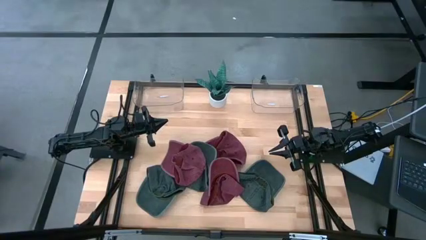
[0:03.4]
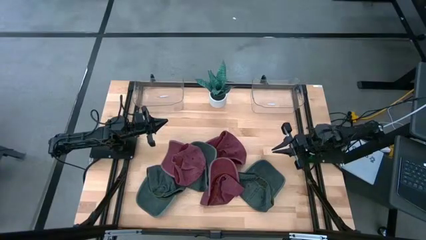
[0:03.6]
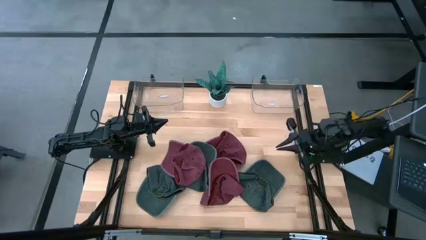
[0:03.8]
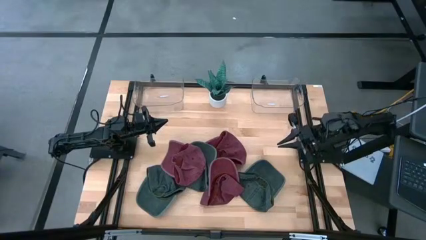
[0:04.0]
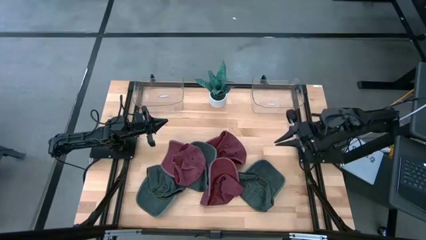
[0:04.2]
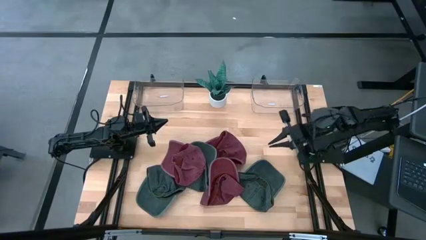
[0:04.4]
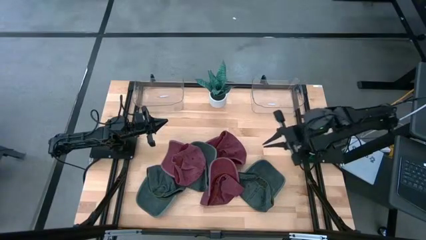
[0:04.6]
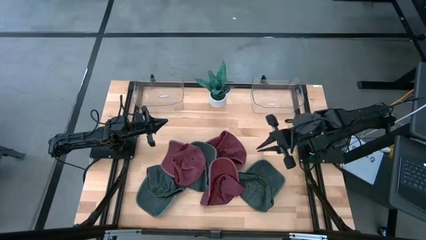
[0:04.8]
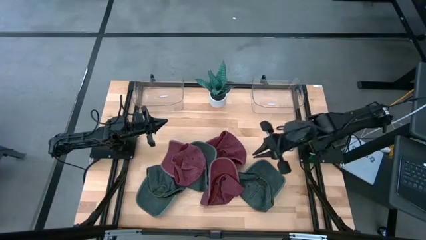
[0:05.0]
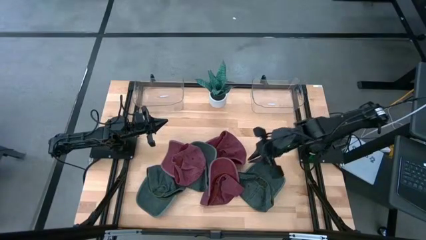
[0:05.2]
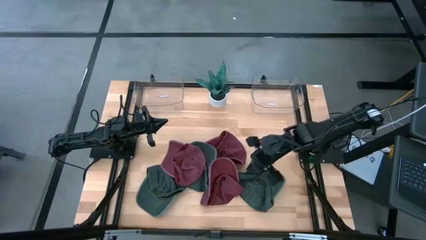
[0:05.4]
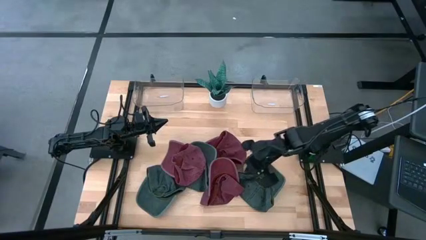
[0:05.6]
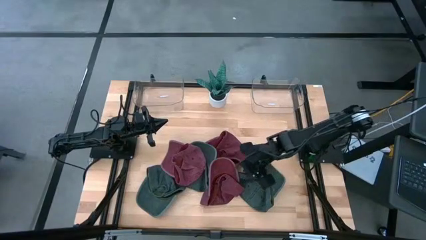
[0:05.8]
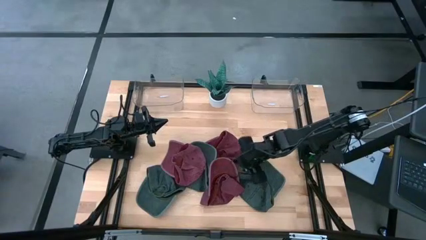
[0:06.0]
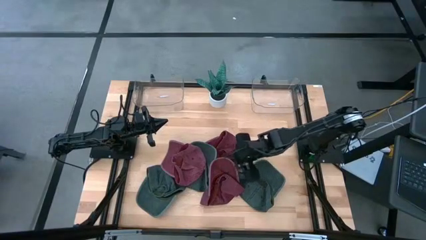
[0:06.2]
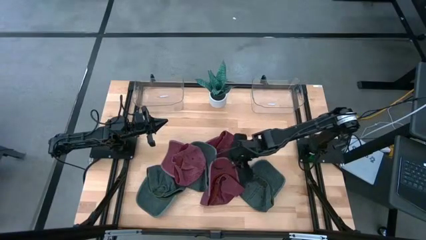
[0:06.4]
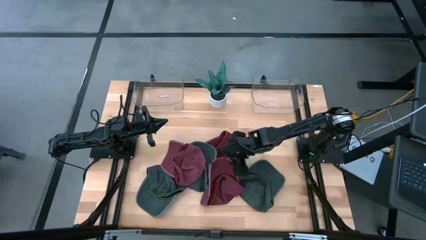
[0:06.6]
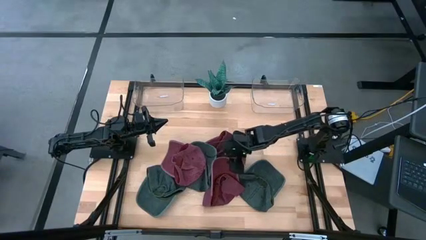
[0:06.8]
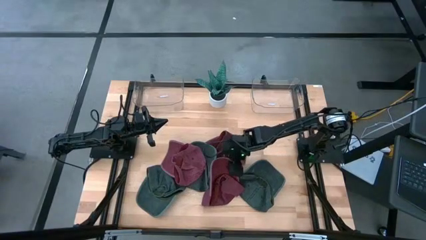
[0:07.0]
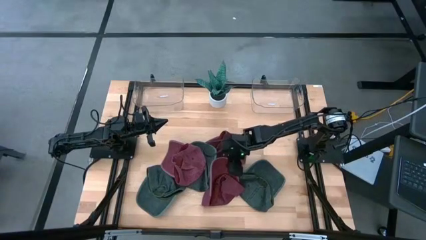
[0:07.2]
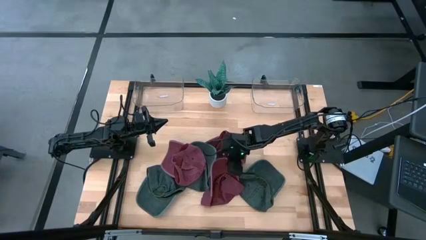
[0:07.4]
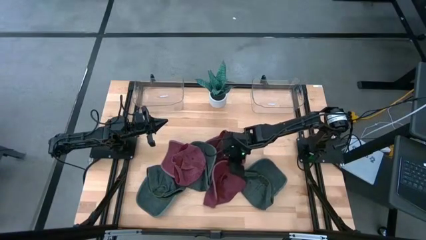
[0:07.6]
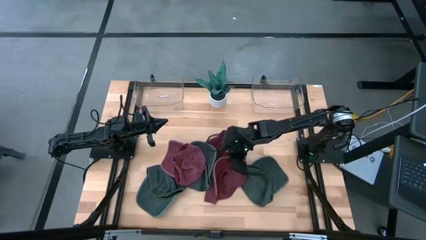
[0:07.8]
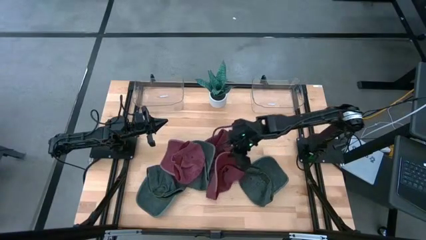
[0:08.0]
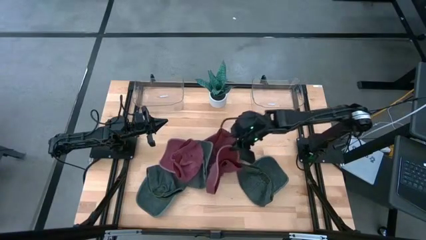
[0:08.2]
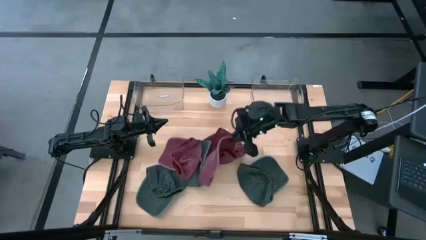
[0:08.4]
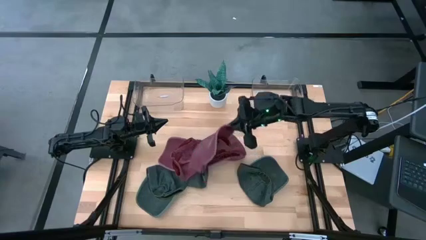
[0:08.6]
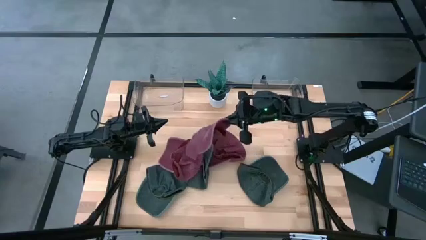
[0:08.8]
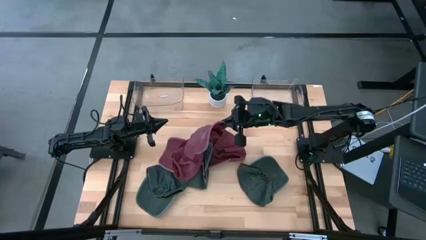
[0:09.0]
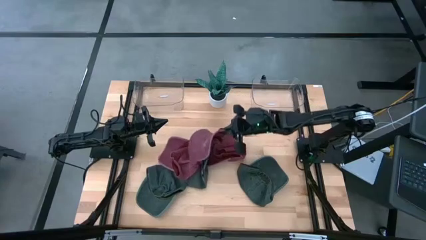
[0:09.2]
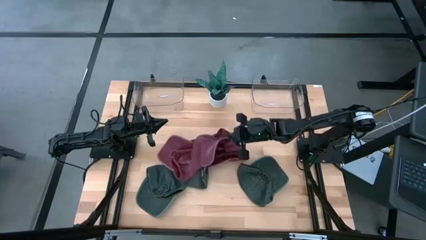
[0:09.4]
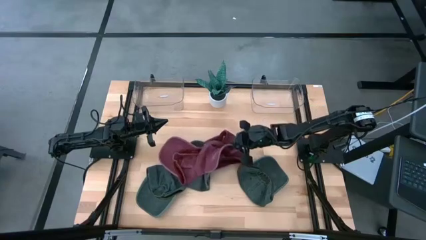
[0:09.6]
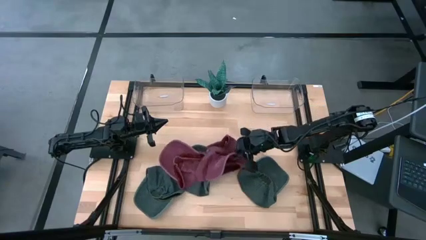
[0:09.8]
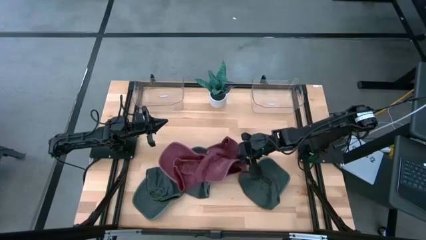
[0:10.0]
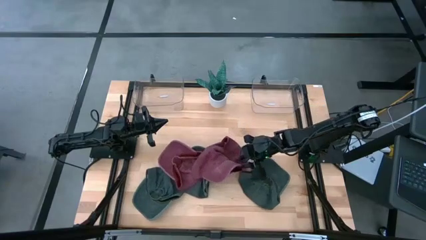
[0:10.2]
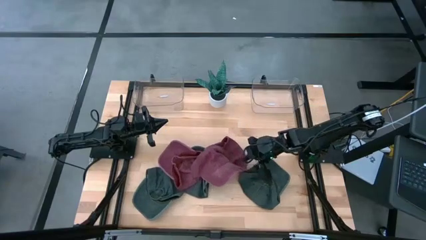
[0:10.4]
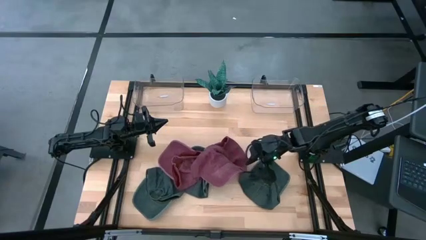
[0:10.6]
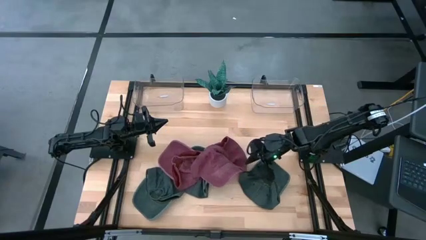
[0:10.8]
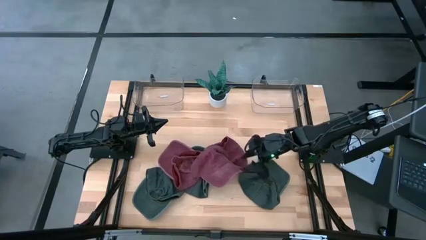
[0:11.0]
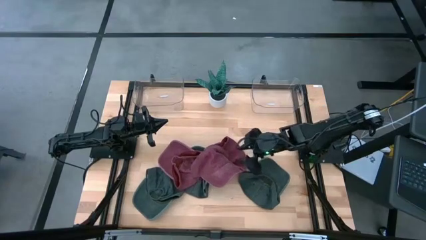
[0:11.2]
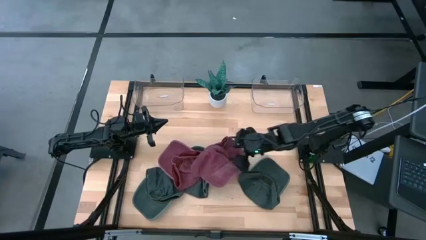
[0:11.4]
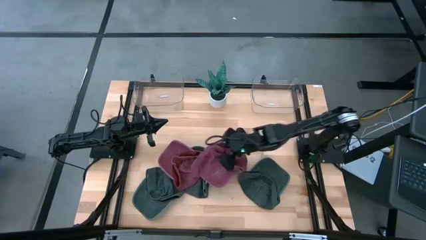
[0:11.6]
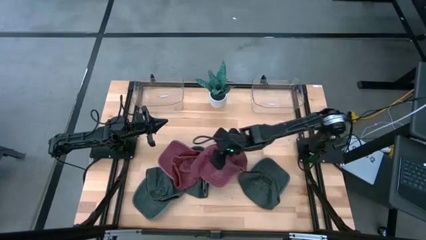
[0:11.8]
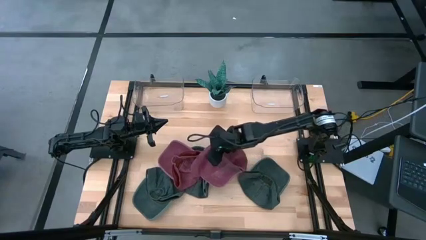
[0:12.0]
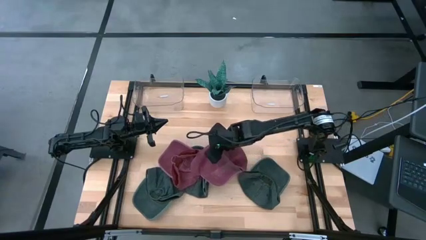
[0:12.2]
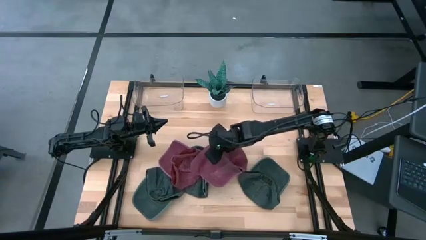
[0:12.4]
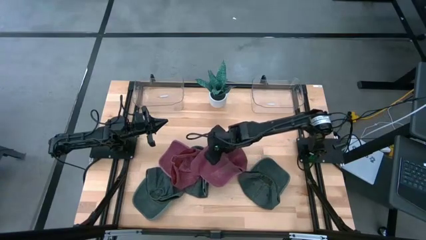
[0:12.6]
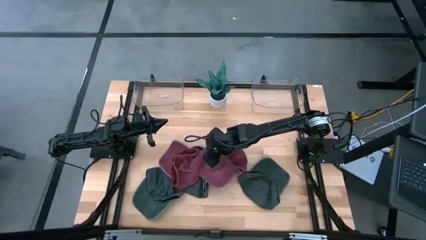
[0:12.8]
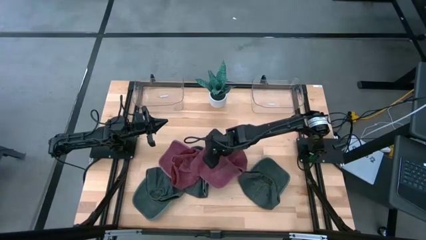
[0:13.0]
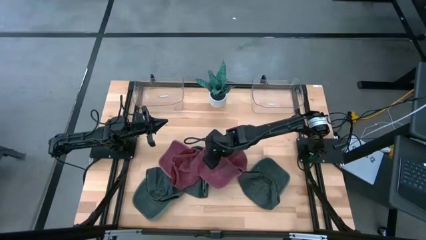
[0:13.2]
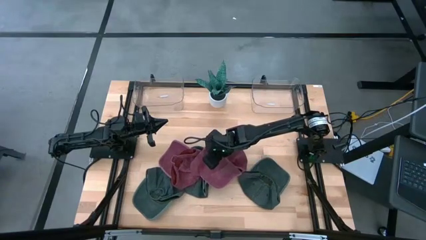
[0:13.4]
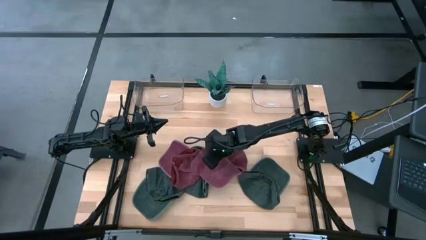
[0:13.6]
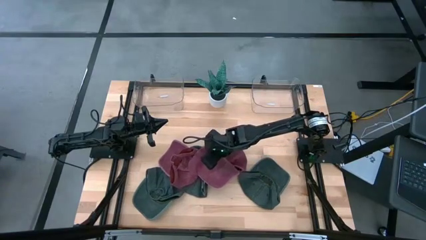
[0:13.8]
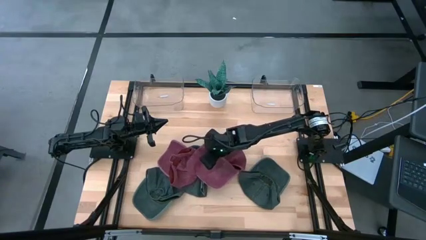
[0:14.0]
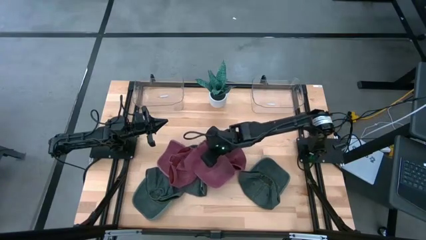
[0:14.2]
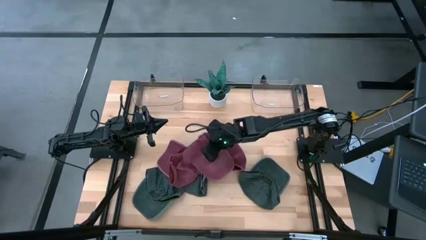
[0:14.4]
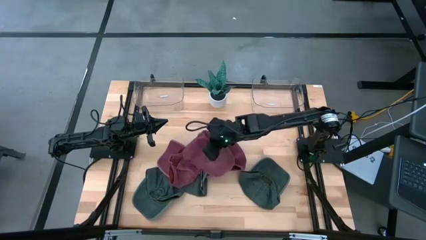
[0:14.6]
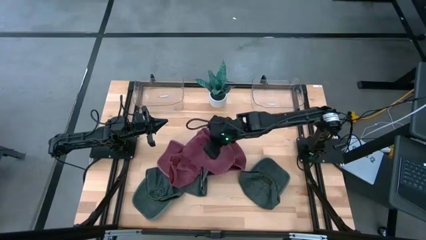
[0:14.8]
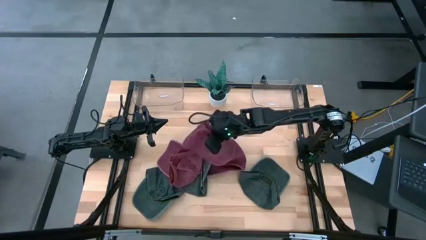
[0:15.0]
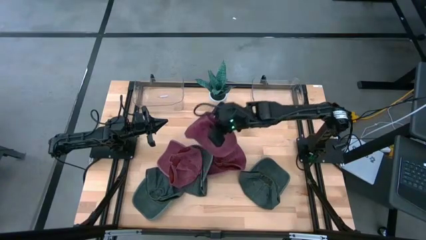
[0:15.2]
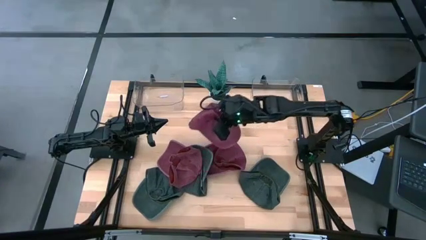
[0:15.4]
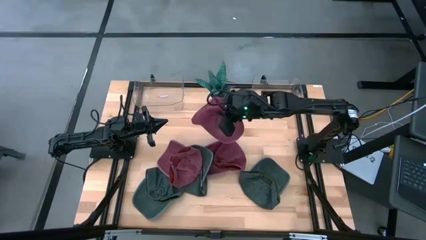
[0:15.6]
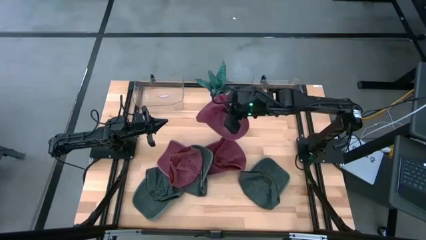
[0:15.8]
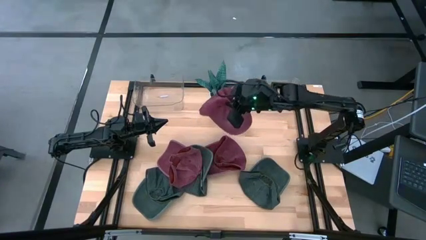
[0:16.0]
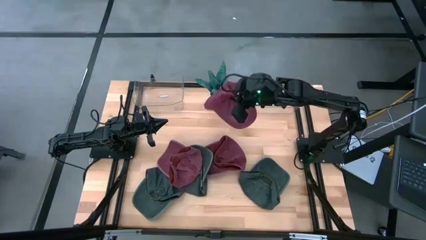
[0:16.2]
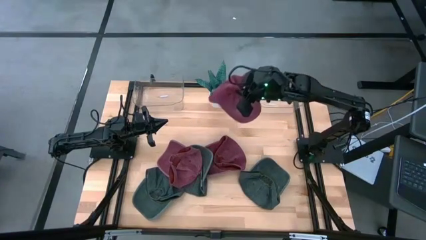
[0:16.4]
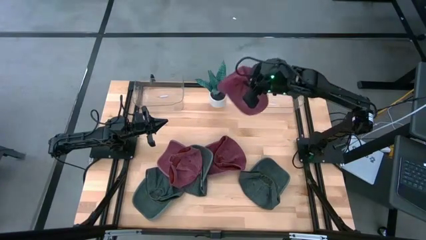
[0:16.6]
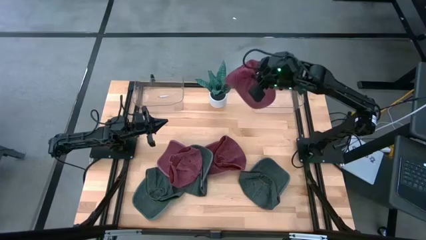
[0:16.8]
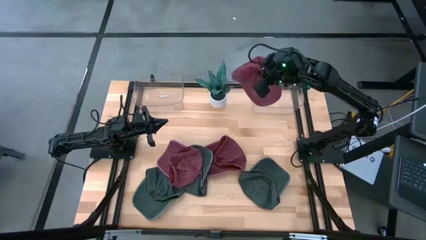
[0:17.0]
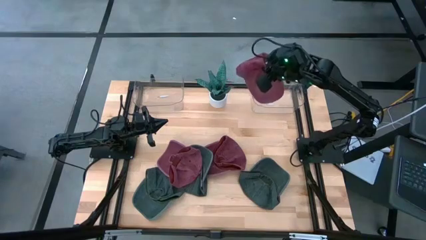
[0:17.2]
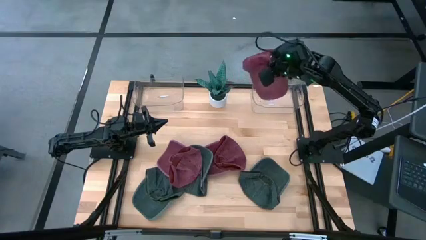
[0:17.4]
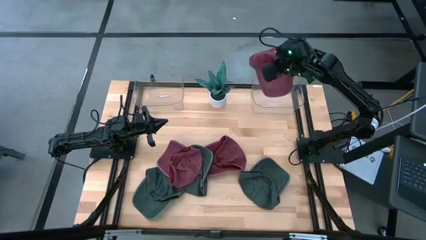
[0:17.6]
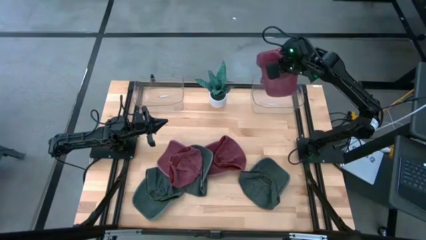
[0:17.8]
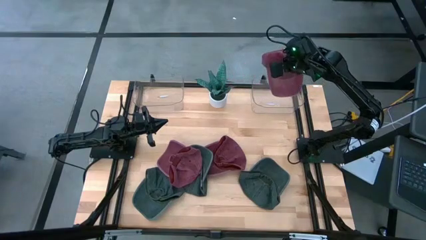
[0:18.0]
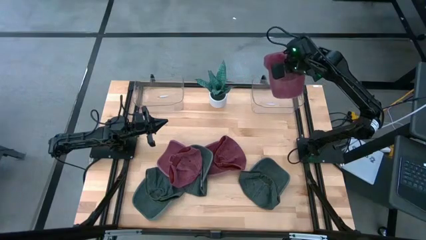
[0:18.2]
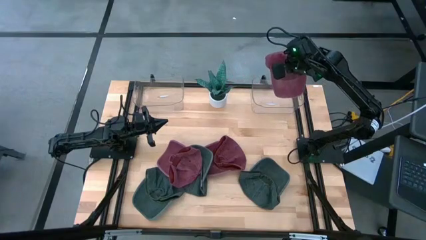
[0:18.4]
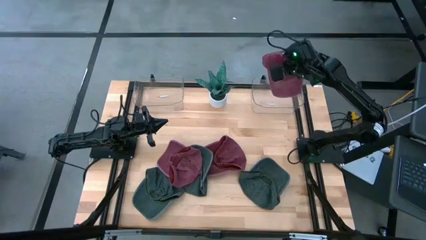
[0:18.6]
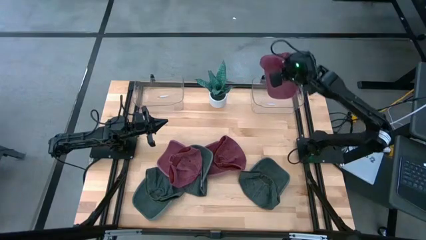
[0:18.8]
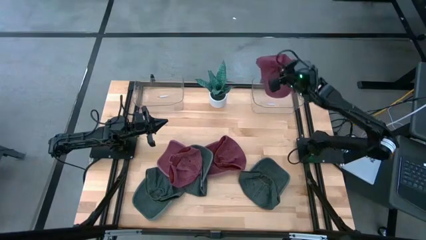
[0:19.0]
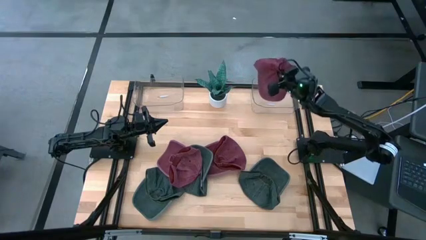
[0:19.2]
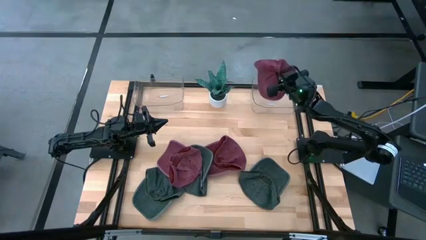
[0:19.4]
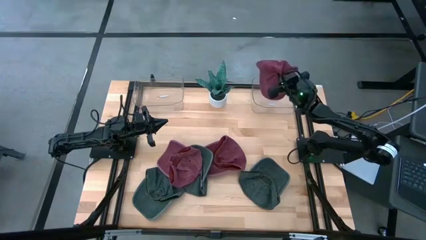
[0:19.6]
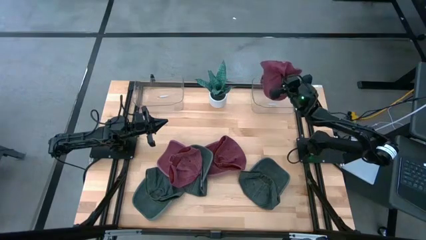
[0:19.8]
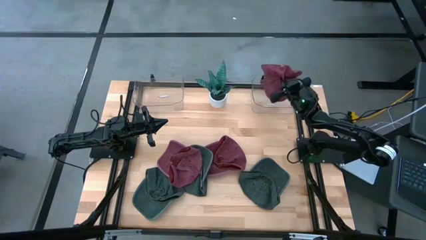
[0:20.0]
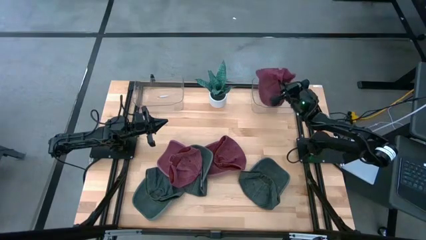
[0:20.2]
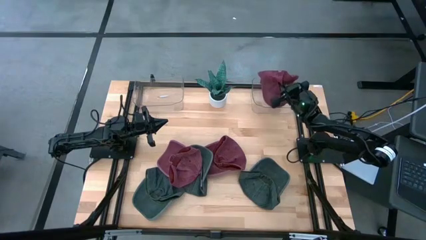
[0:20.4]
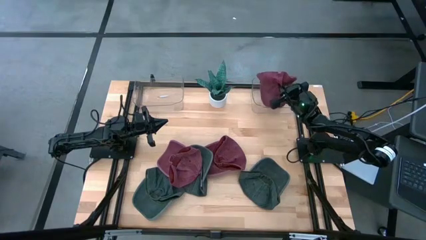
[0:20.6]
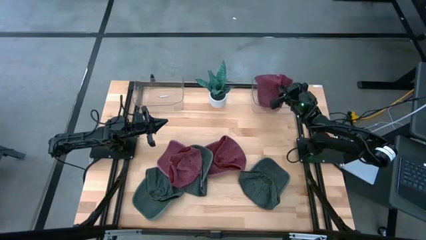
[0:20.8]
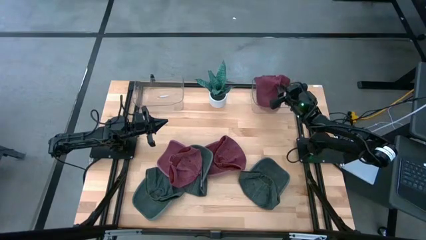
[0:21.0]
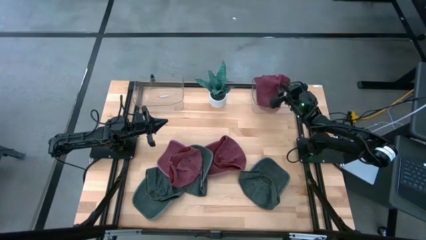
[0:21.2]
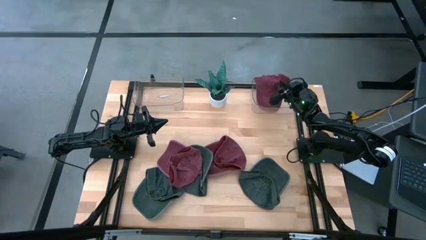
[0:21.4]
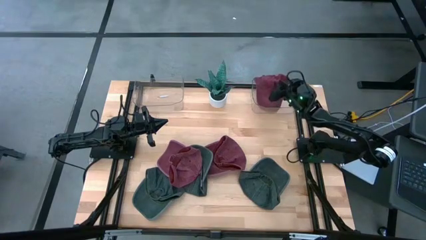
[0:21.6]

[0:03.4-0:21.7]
Task: Pick & Place hat
Put the middle bottom red cap into the right transparent bin
